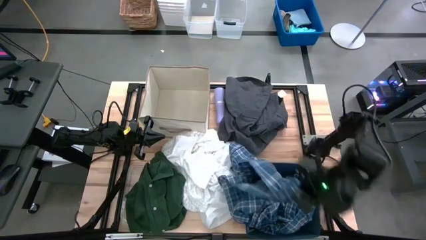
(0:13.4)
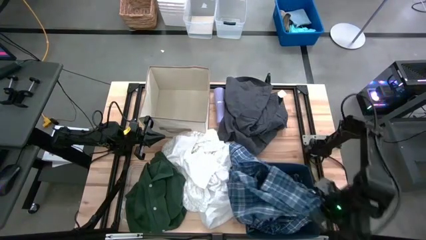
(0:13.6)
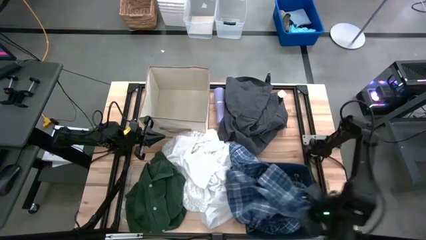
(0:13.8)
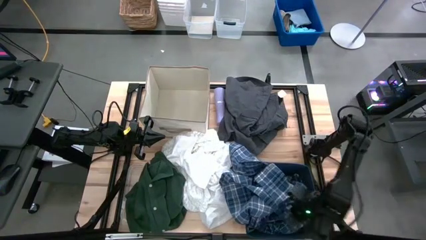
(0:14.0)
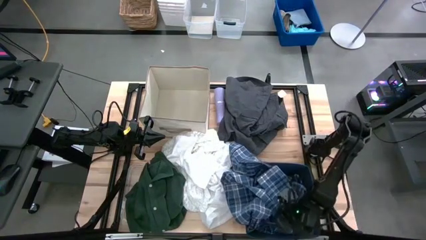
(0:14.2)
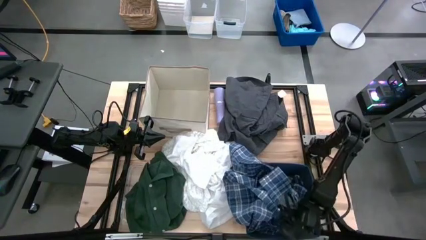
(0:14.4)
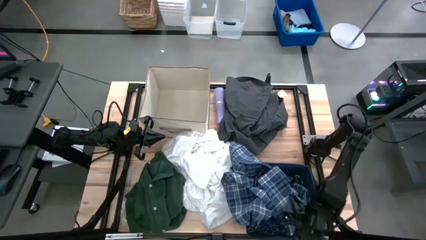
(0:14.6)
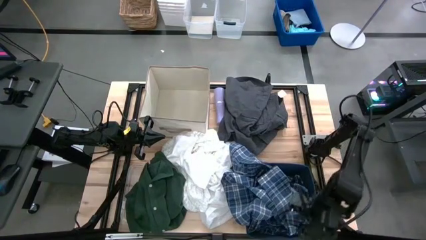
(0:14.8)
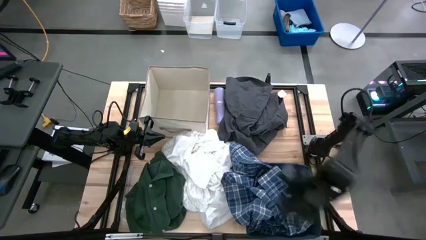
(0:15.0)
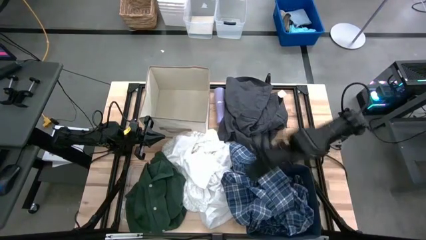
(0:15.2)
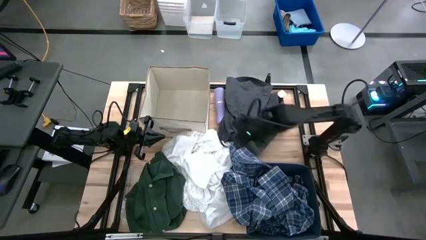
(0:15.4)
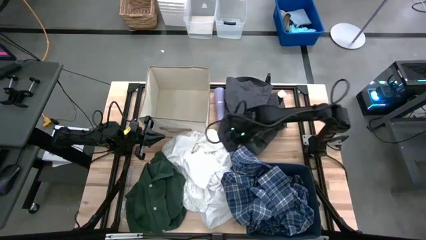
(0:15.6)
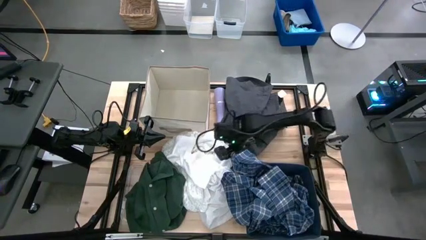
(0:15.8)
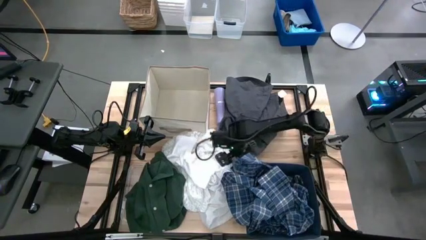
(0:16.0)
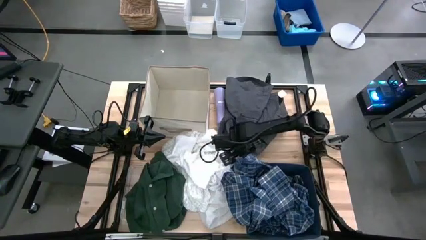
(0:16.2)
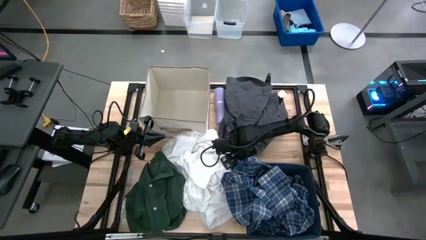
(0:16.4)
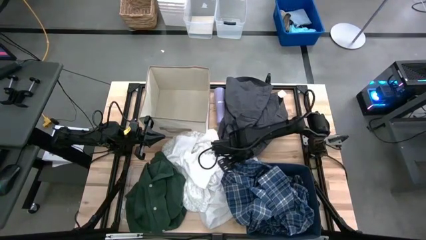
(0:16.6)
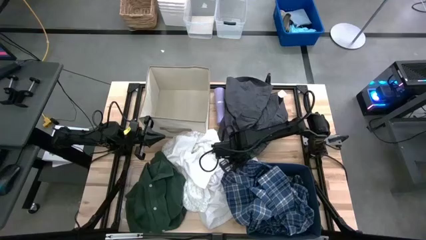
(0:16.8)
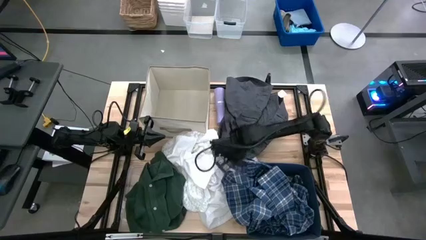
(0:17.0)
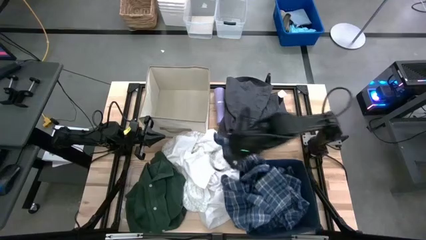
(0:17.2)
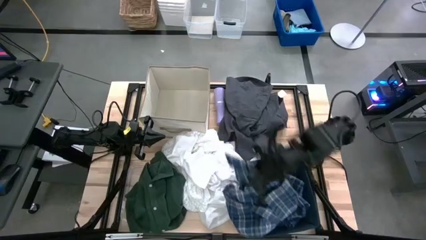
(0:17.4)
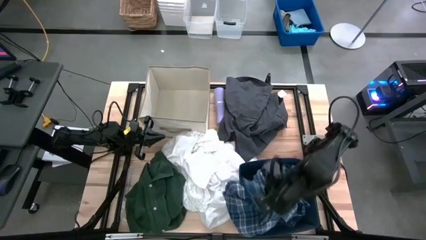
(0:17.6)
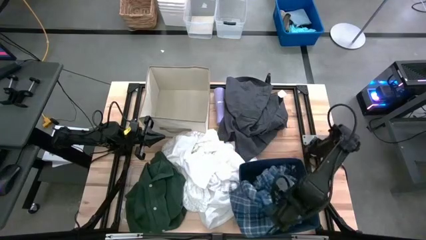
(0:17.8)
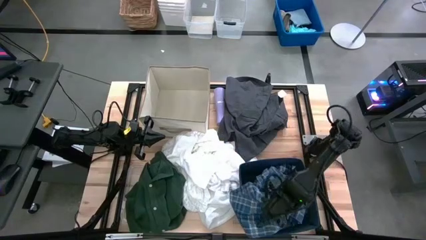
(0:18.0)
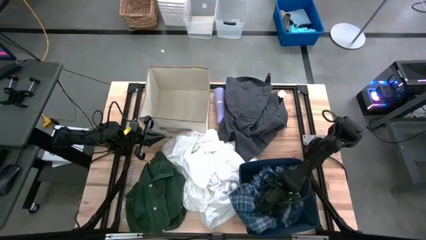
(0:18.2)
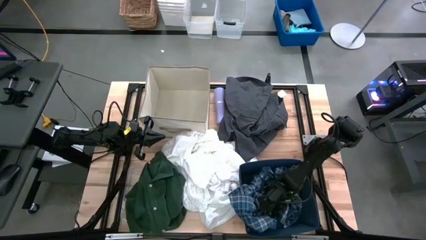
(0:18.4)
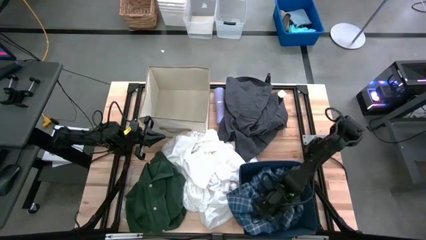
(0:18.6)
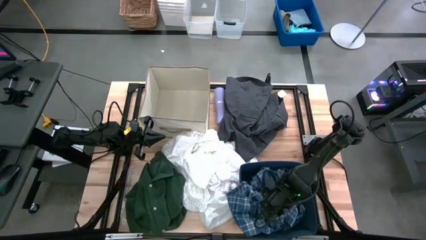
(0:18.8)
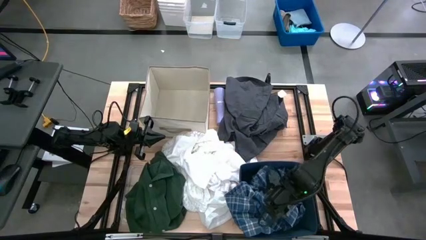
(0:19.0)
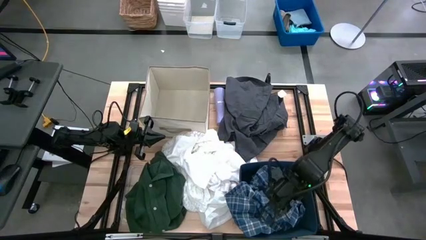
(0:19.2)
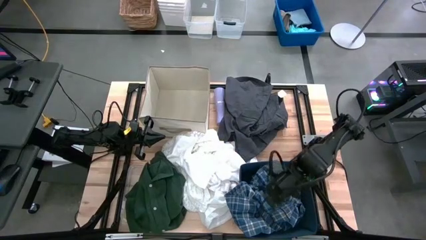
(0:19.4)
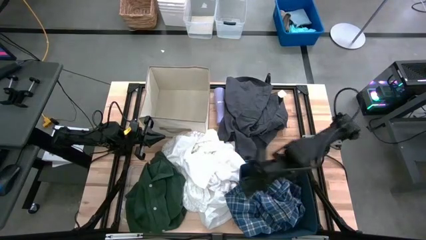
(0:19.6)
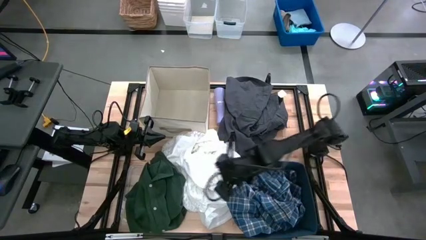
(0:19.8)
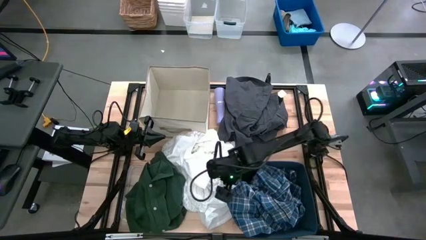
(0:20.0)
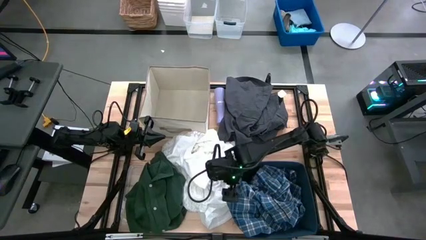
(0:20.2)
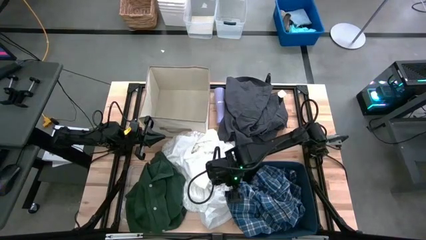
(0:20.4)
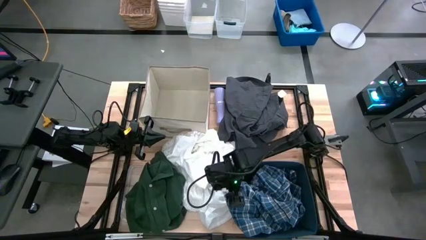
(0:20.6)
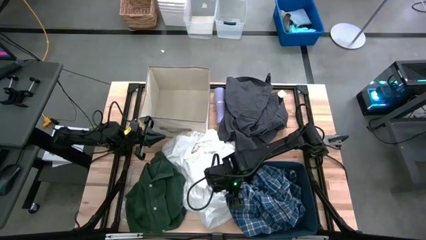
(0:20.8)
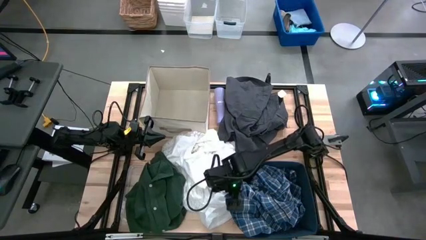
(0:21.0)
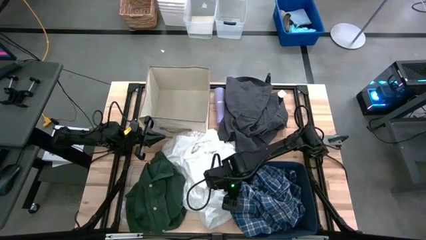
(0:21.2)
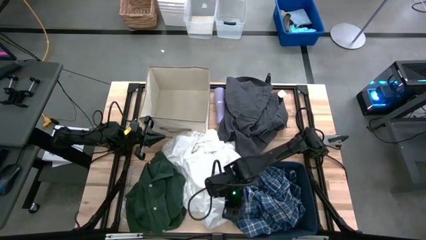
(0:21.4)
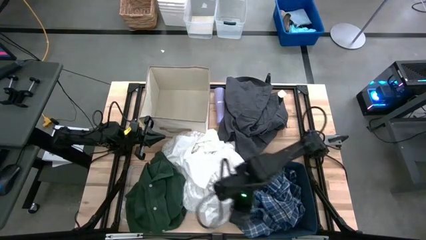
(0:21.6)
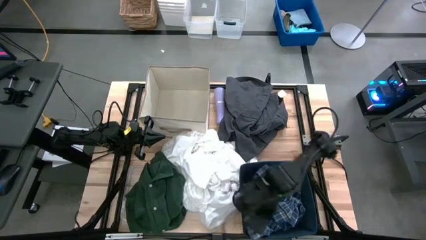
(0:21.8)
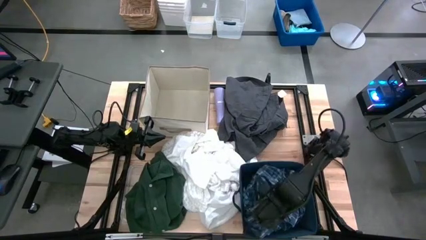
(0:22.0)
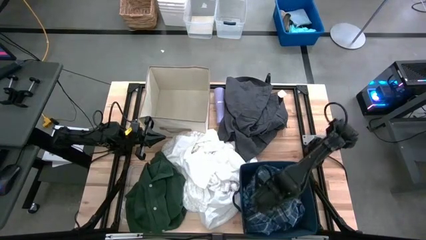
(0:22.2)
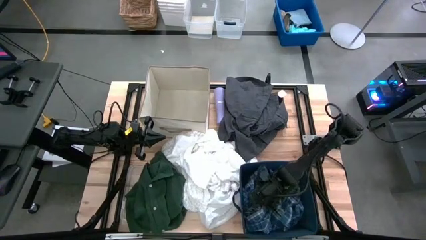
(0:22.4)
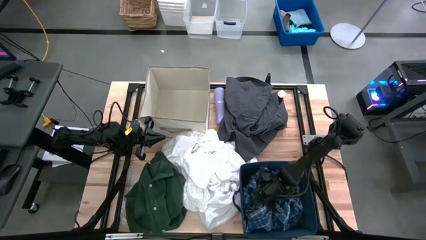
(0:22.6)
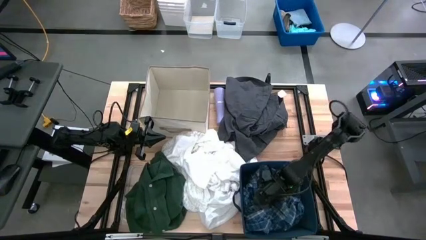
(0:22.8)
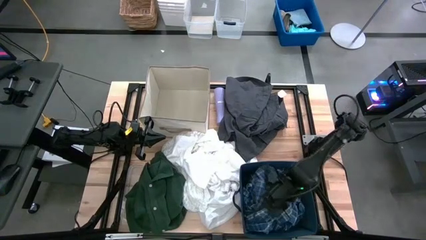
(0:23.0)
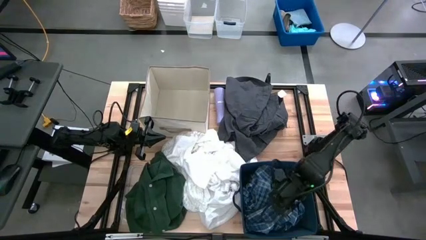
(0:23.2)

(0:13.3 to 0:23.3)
Task: Sort clothes
Put the blue shirt into the blue laundry organizer

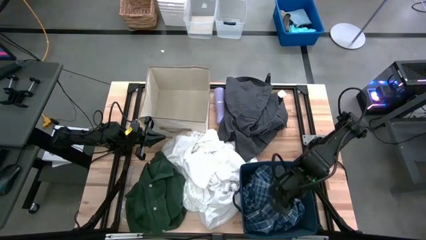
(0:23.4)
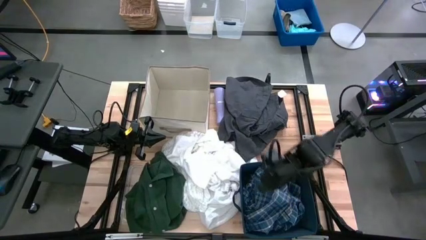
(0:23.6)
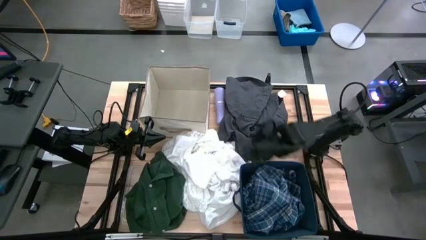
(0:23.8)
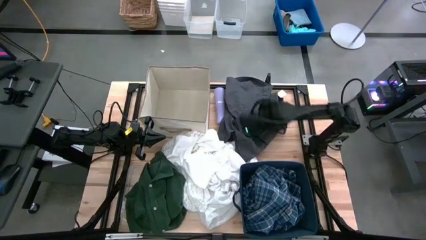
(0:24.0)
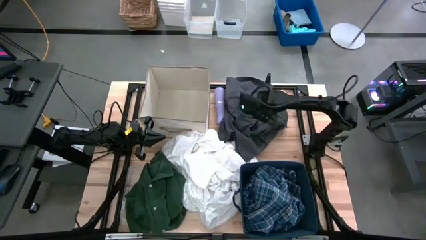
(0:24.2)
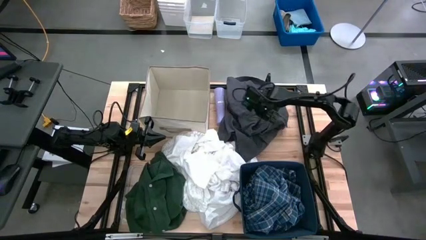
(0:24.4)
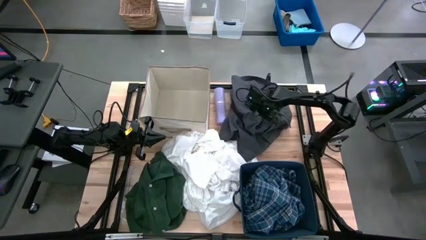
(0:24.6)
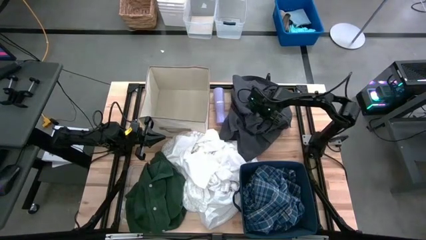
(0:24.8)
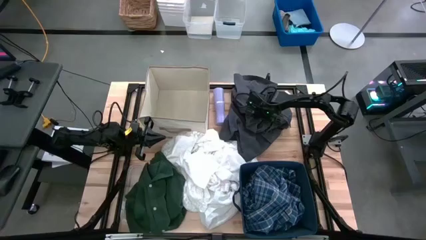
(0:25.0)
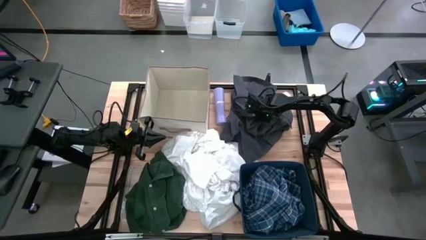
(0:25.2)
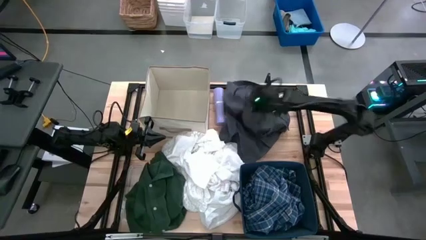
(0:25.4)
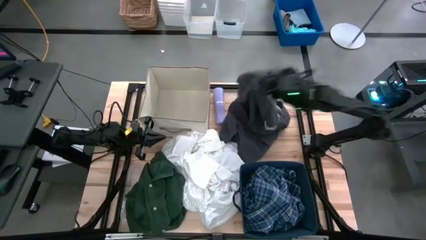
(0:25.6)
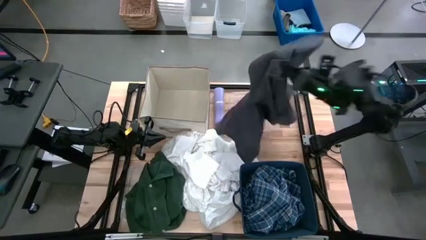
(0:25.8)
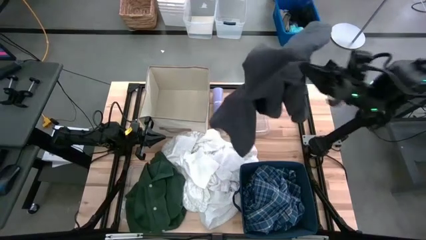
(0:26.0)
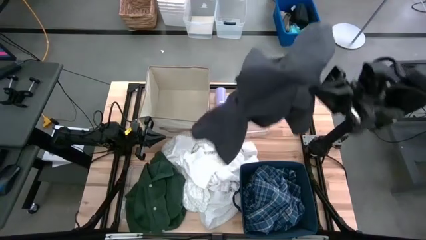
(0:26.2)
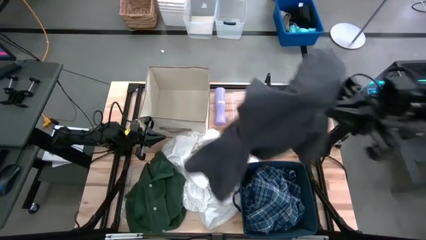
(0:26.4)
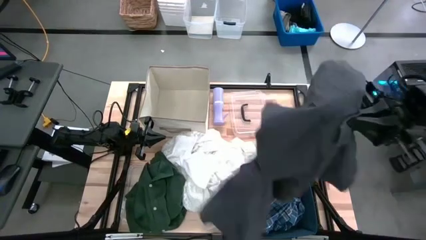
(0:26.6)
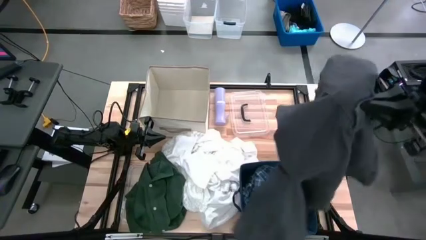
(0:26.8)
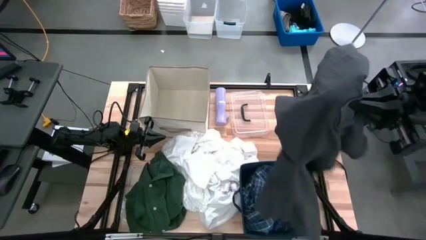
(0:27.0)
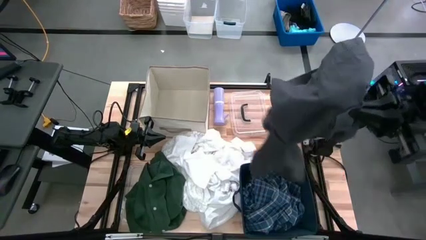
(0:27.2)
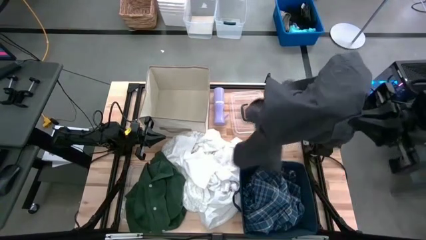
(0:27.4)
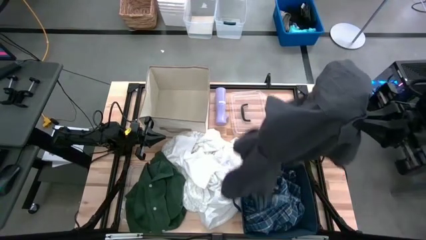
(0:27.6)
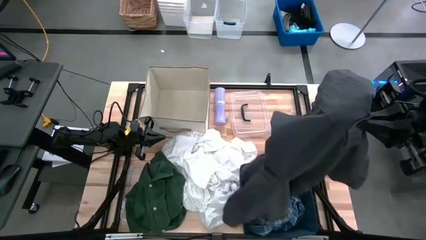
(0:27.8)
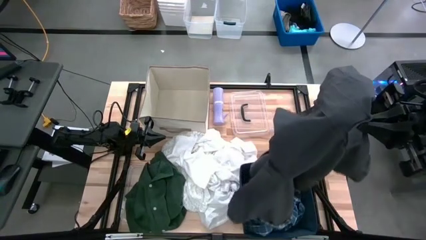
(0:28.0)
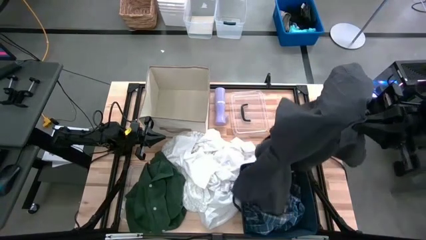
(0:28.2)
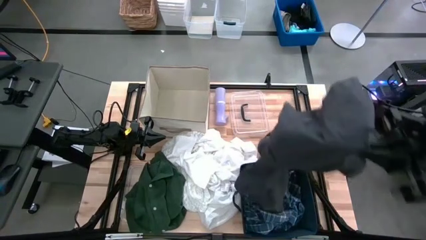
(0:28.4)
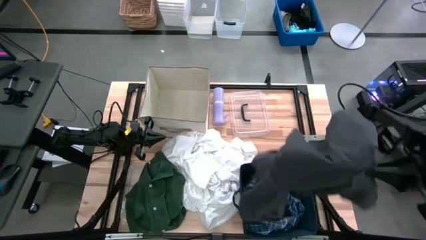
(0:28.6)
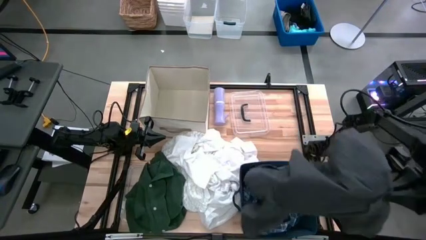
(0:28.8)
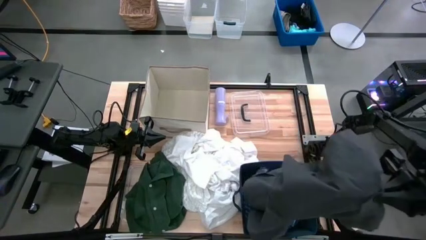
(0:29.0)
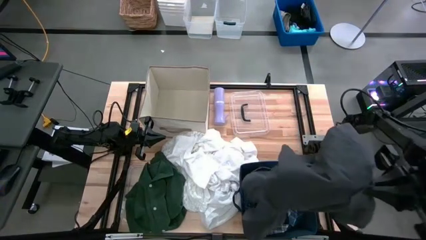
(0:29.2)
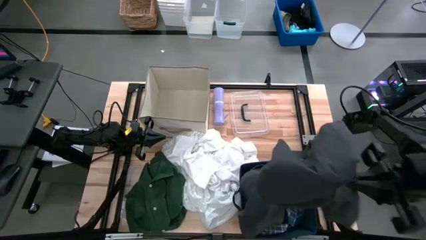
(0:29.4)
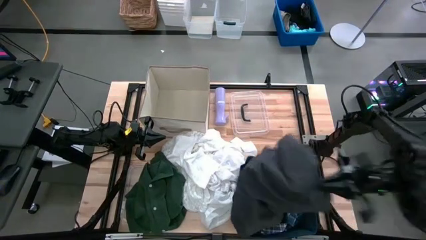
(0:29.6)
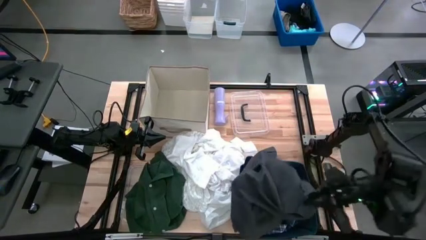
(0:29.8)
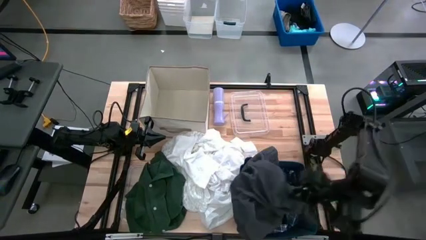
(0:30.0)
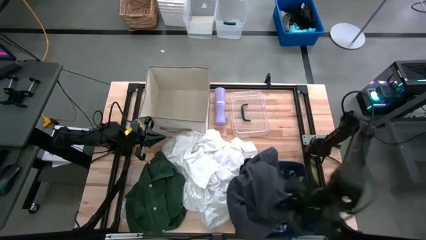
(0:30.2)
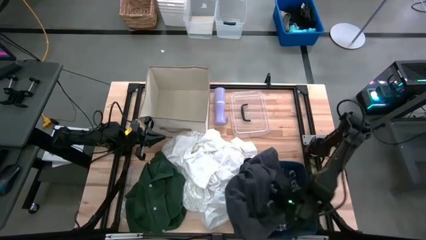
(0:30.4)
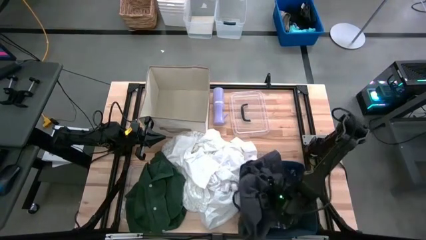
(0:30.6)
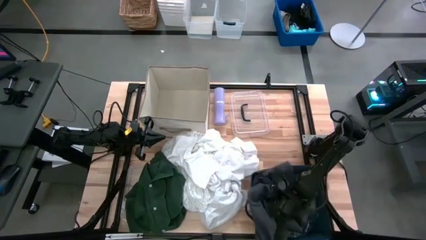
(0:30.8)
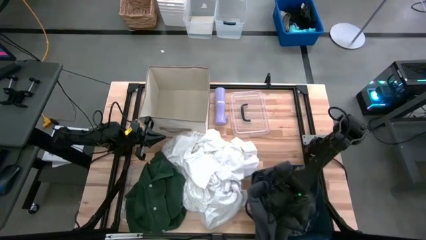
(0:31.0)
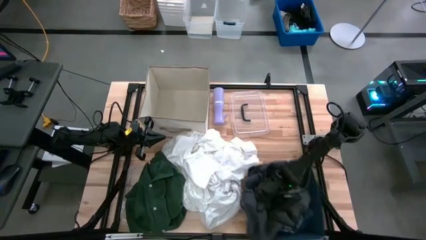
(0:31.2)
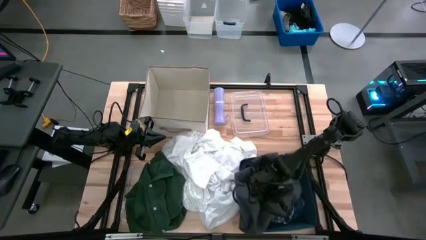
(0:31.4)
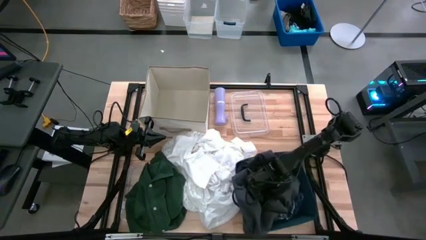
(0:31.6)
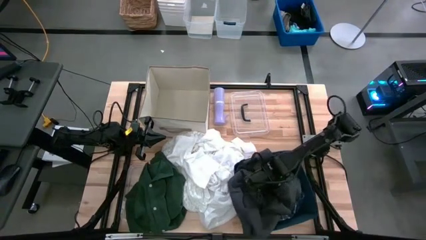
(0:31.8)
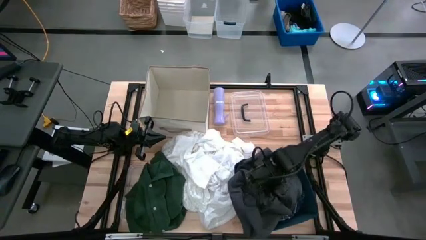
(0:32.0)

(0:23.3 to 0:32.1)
Put the black shorts into the blue laundry organizer
